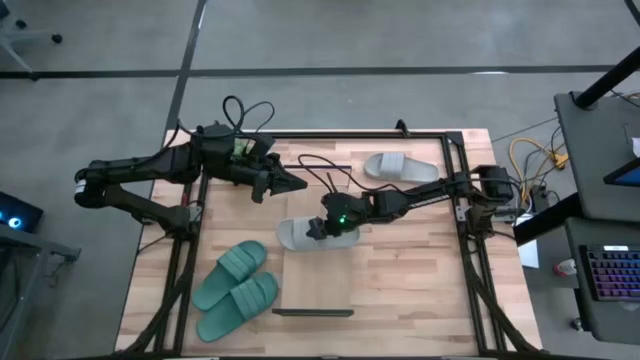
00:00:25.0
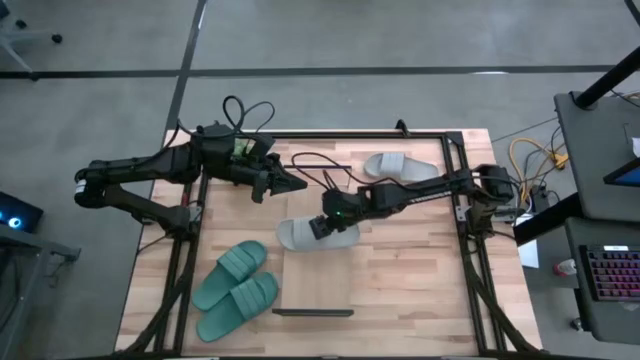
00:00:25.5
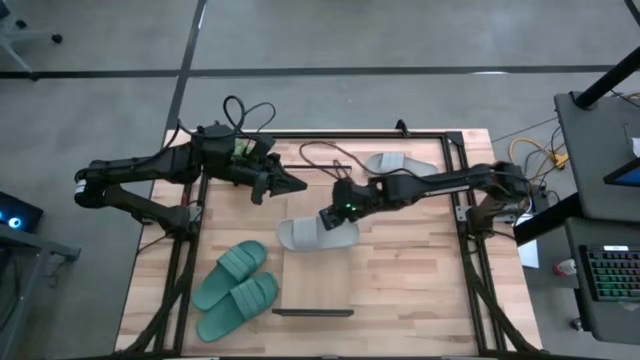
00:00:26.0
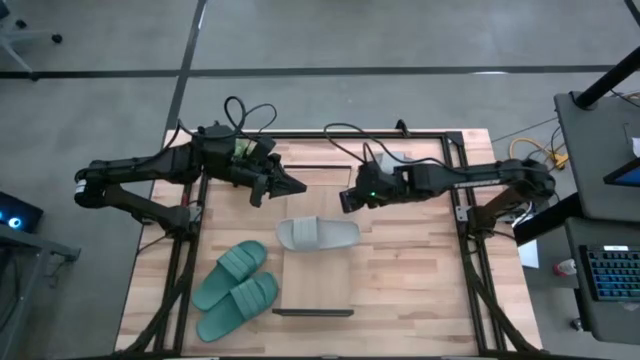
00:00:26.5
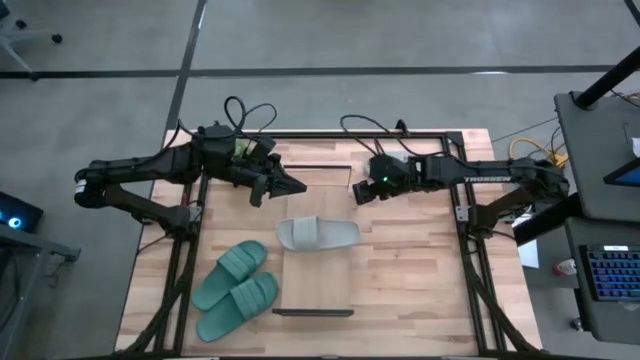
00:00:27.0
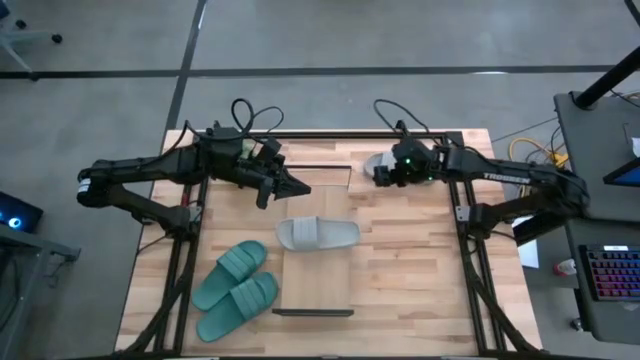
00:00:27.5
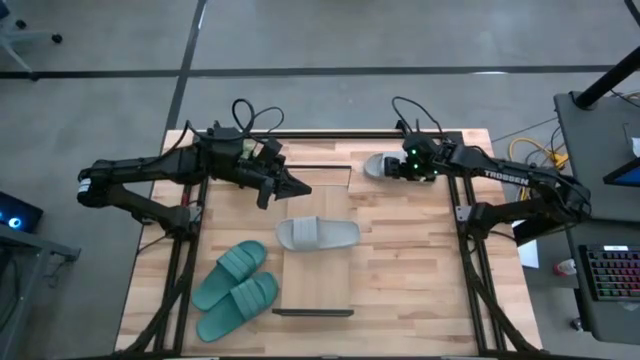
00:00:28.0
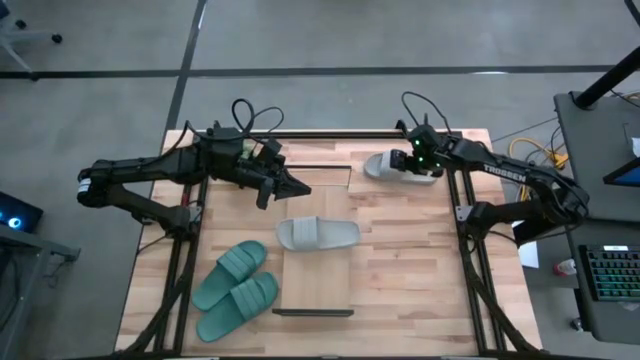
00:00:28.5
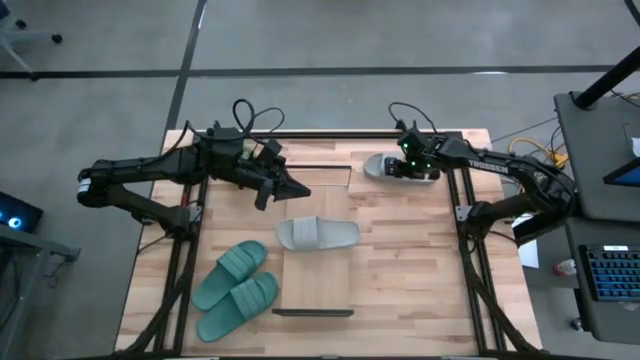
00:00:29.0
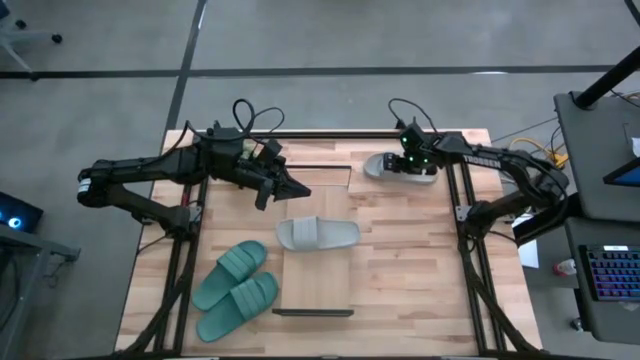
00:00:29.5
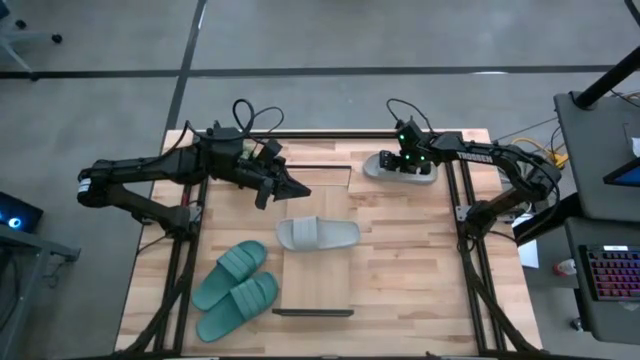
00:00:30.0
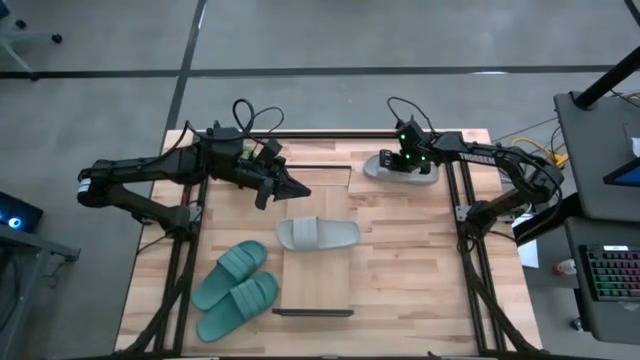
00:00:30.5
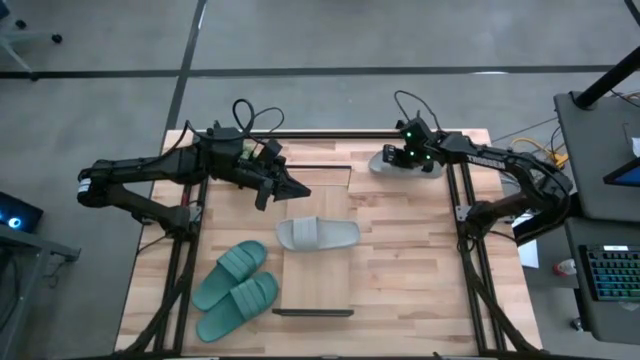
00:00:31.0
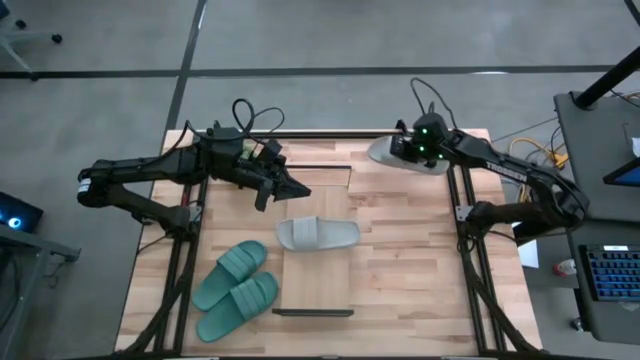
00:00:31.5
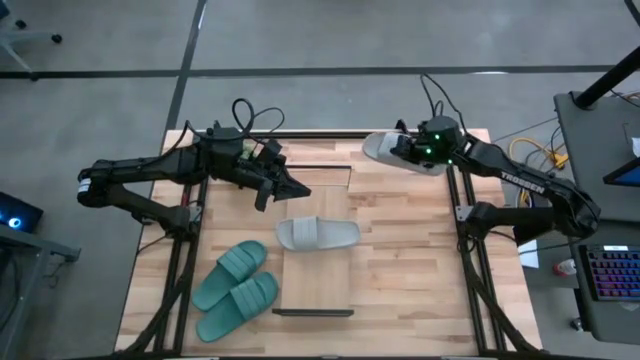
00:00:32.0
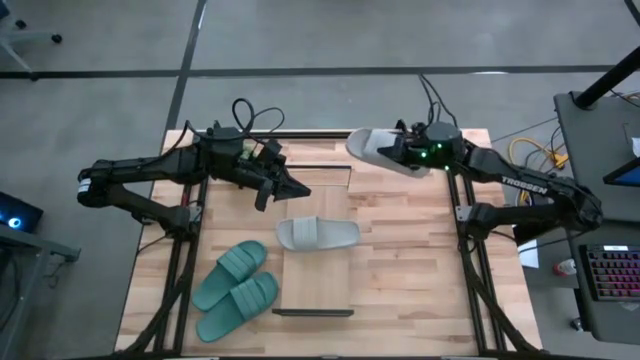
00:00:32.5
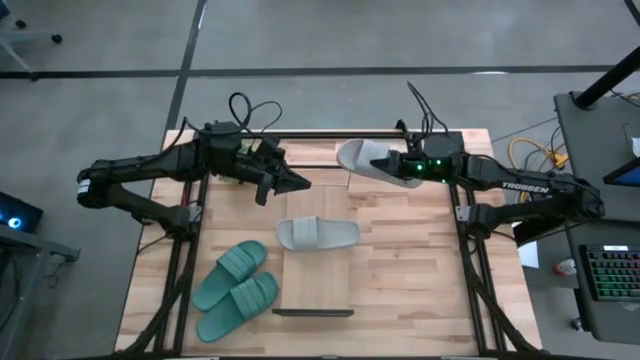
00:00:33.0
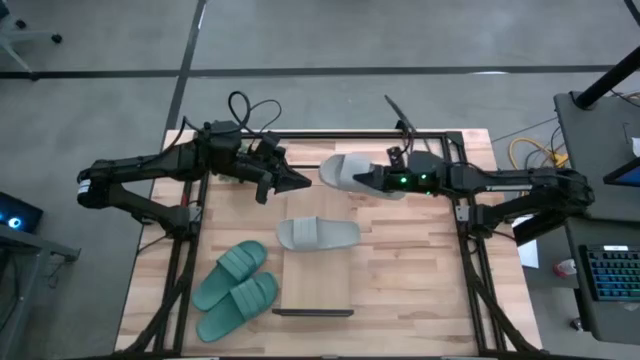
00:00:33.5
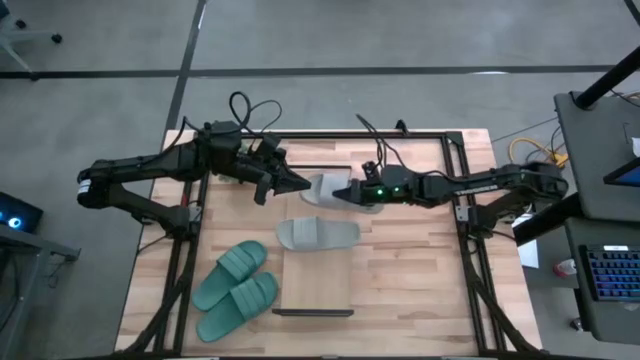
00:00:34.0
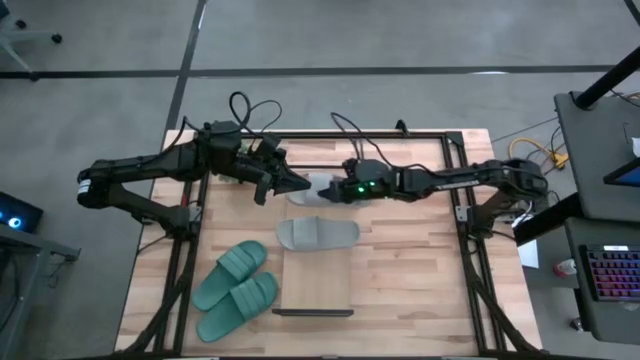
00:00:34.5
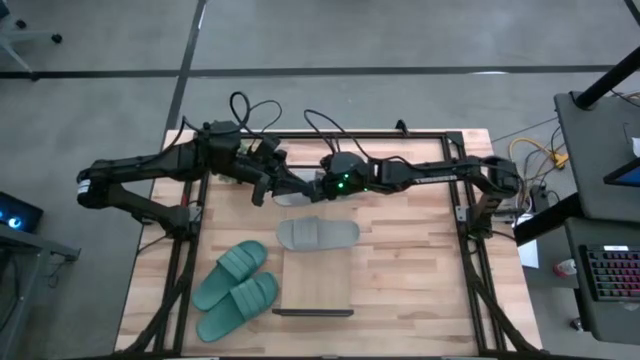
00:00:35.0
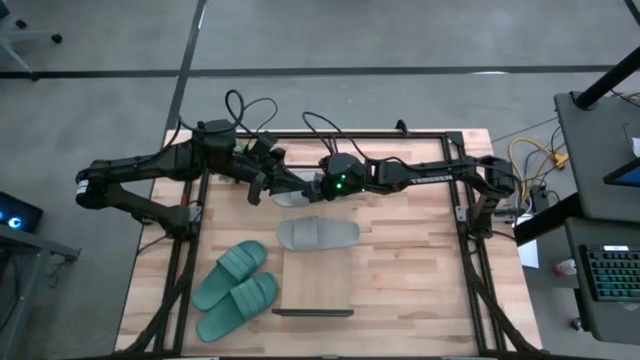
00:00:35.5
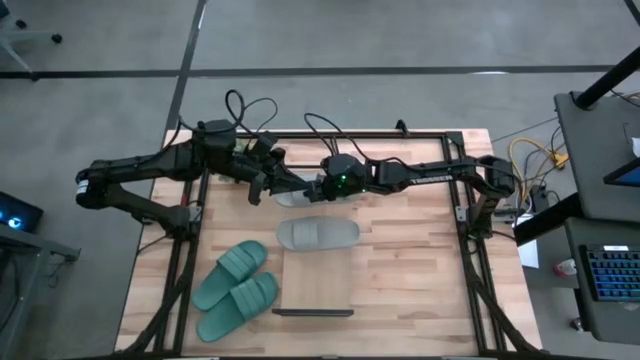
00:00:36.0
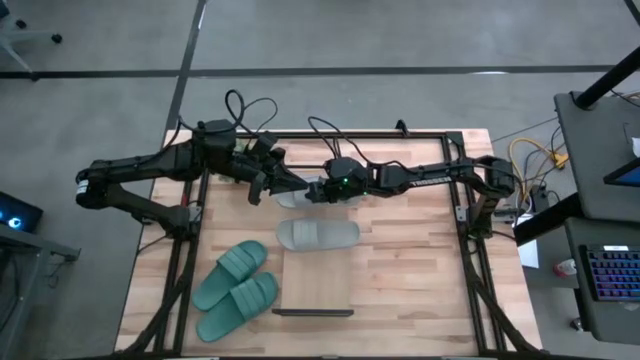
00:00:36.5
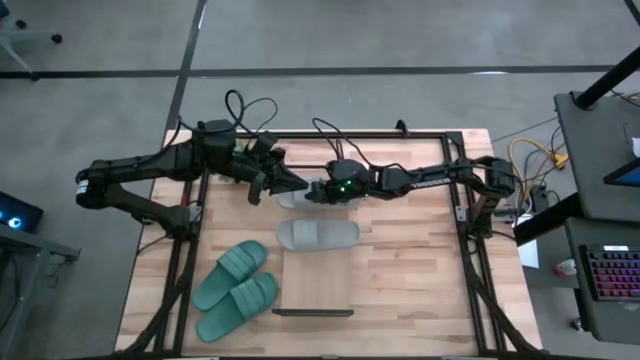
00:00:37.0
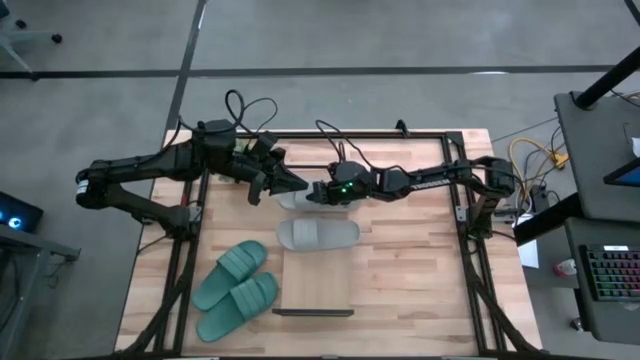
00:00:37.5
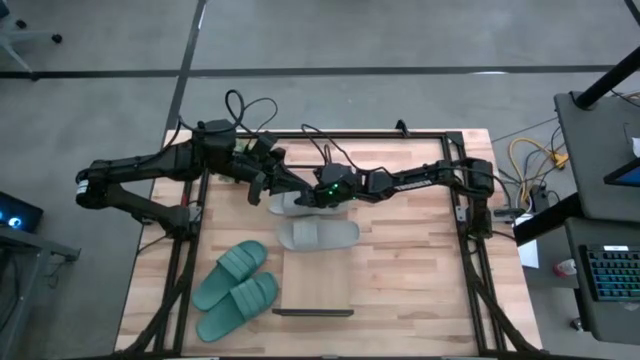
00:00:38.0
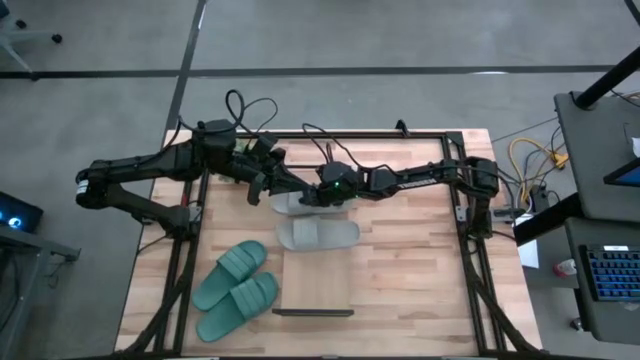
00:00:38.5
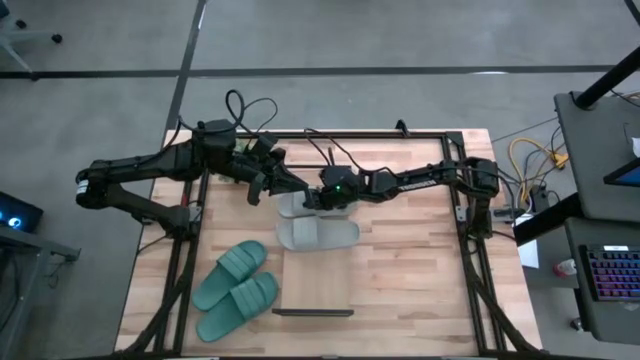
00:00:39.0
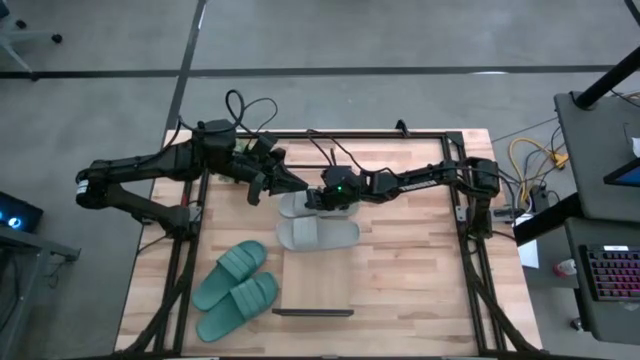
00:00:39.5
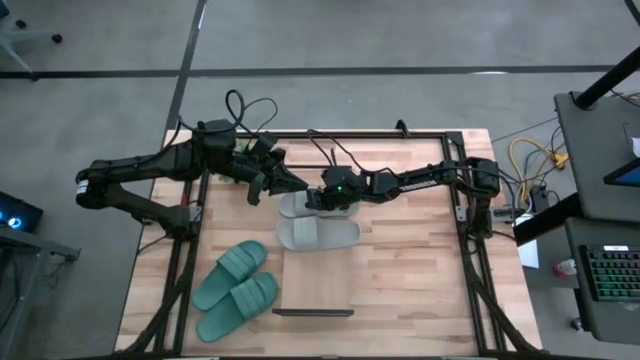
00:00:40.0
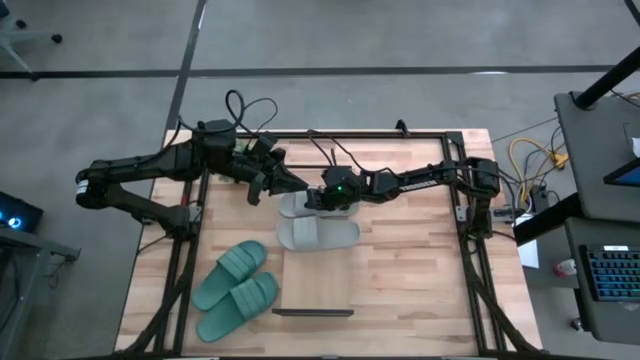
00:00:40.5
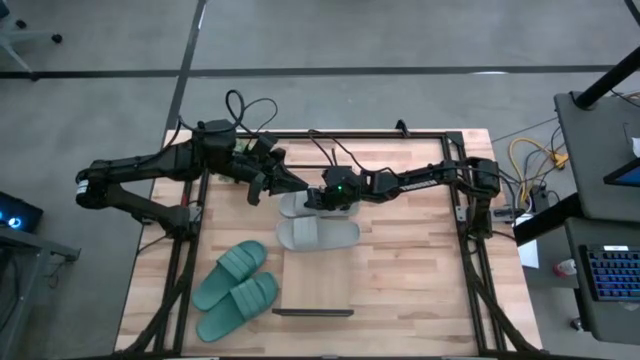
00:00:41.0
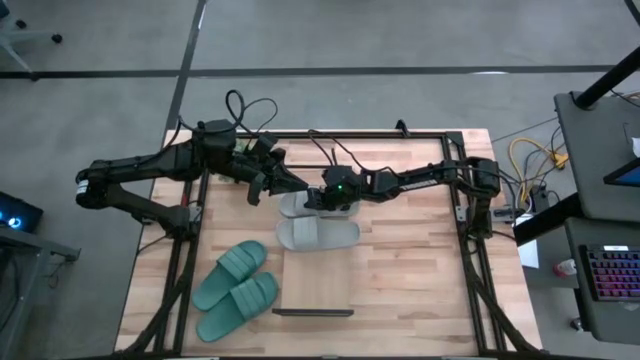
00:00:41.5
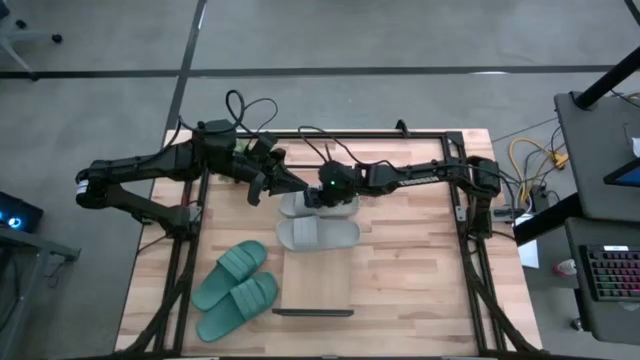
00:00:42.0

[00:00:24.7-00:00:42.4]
Task: Pick and place slides into the shelf
Put the gray slipper on the shelf and align it with the gray slipper
